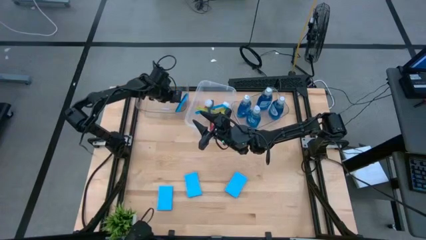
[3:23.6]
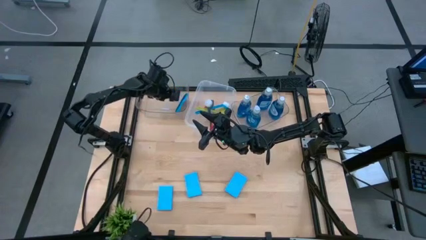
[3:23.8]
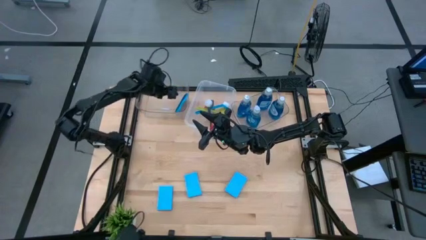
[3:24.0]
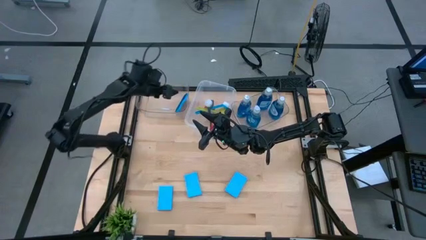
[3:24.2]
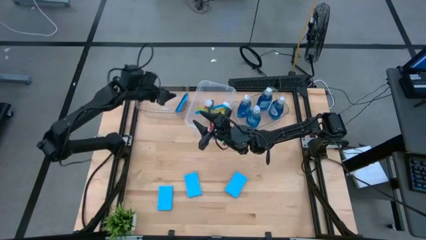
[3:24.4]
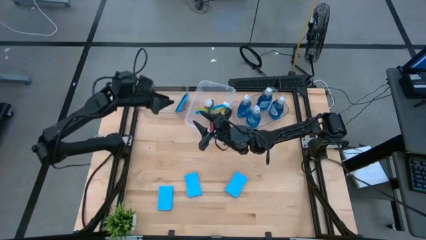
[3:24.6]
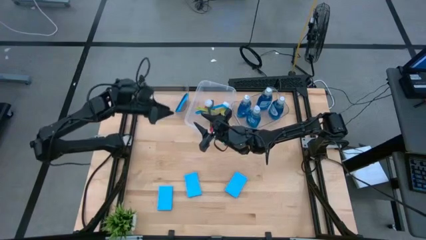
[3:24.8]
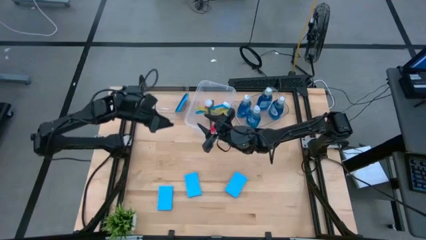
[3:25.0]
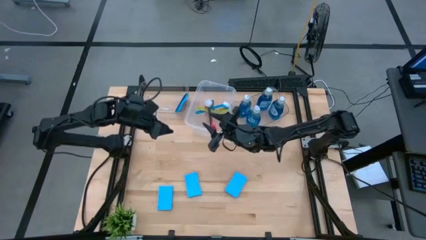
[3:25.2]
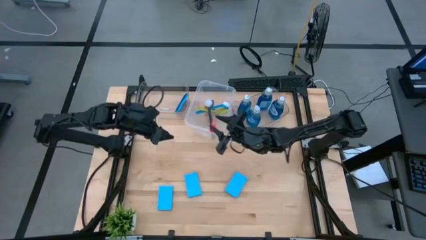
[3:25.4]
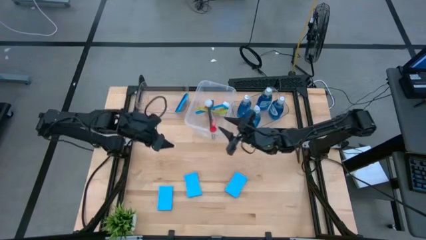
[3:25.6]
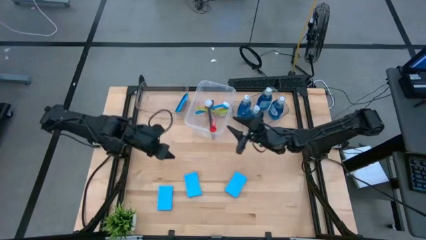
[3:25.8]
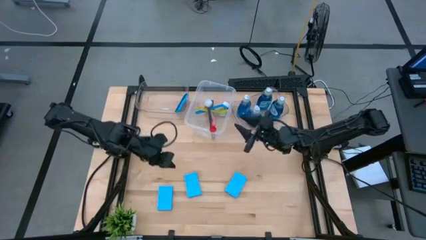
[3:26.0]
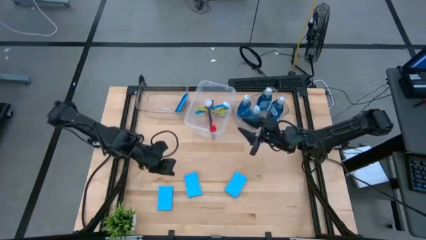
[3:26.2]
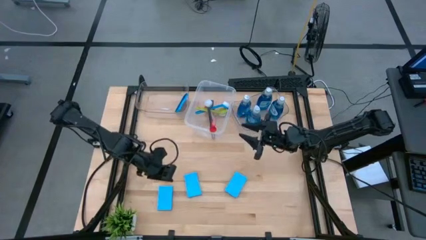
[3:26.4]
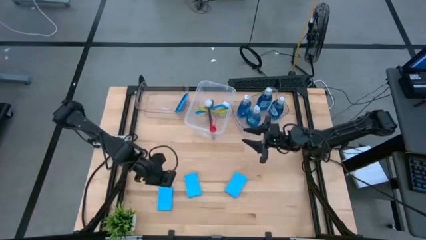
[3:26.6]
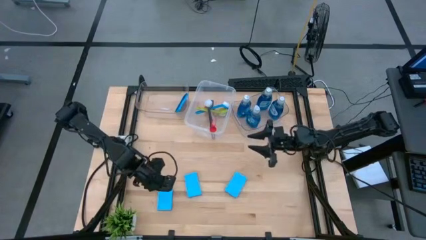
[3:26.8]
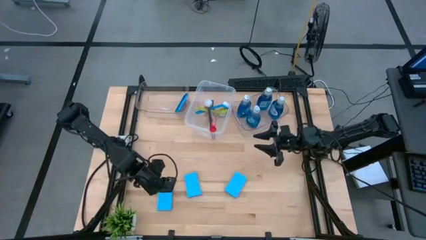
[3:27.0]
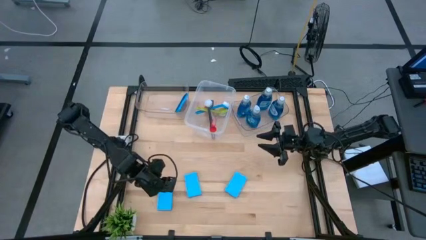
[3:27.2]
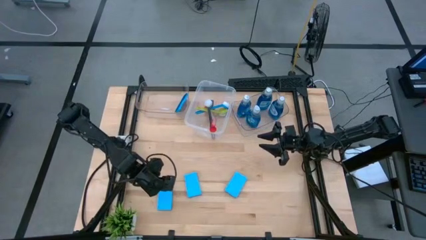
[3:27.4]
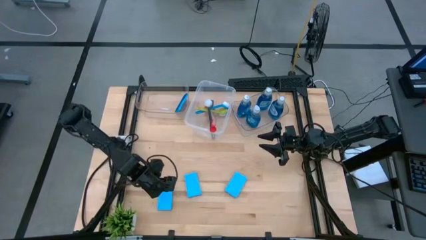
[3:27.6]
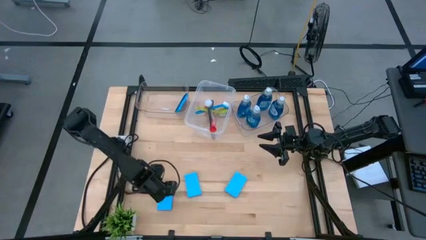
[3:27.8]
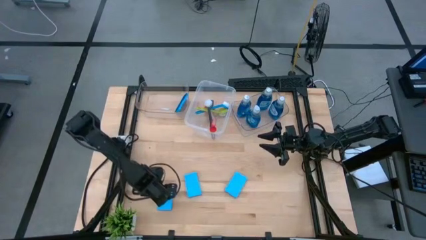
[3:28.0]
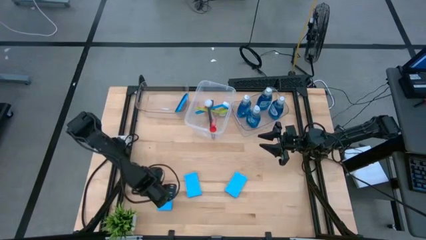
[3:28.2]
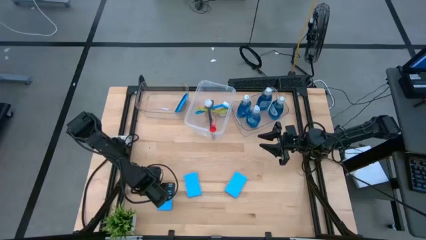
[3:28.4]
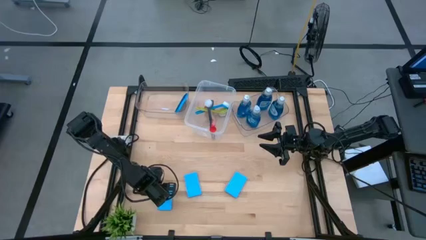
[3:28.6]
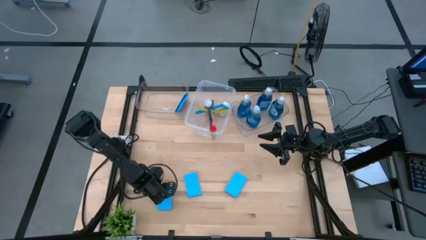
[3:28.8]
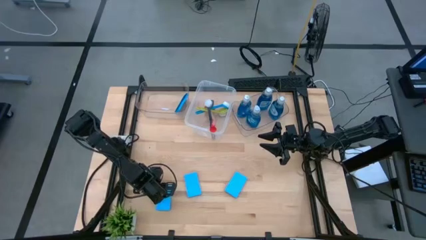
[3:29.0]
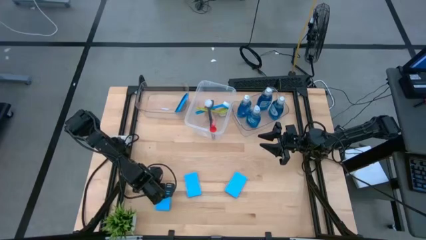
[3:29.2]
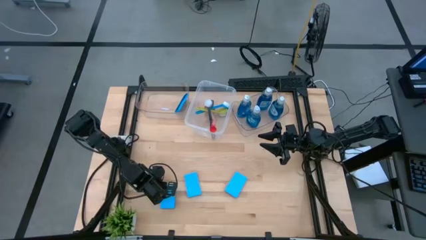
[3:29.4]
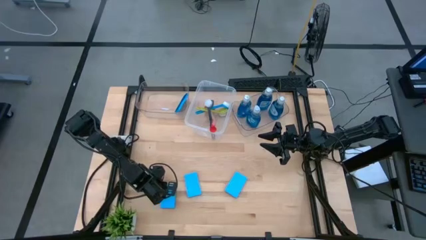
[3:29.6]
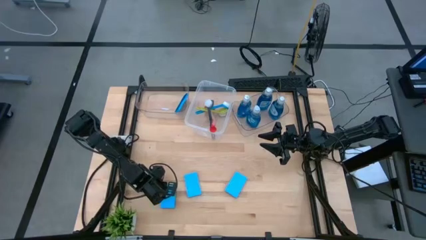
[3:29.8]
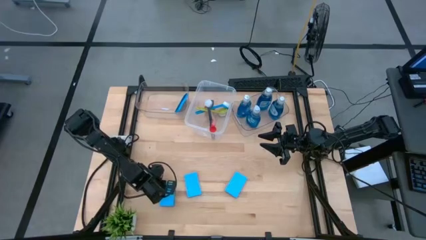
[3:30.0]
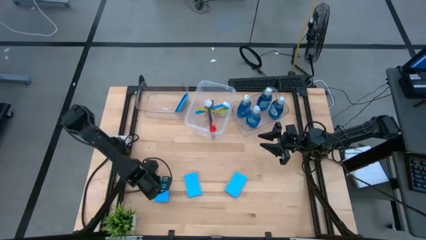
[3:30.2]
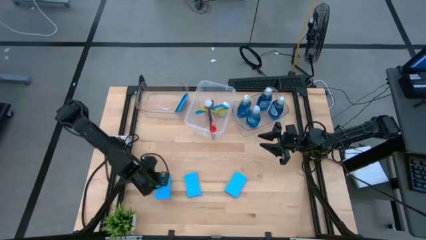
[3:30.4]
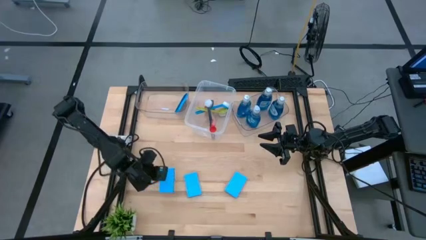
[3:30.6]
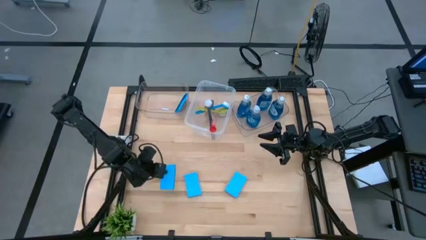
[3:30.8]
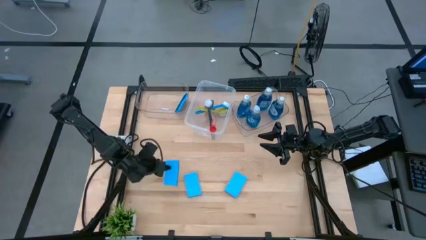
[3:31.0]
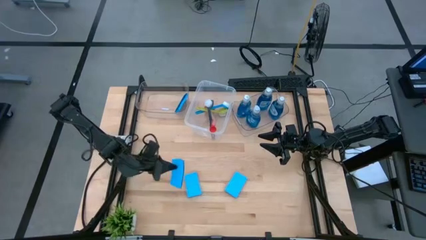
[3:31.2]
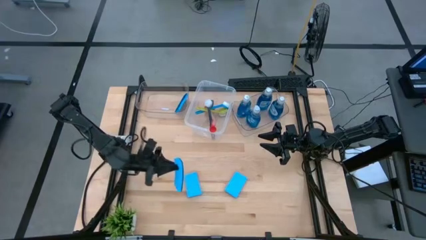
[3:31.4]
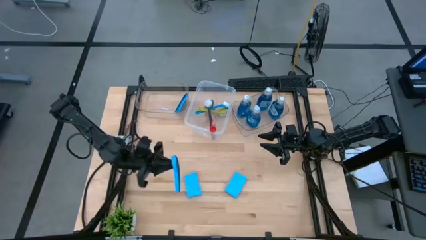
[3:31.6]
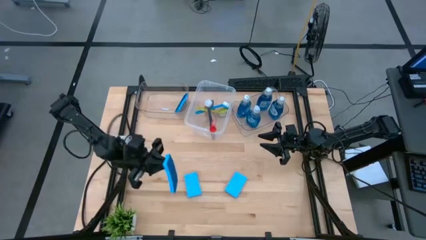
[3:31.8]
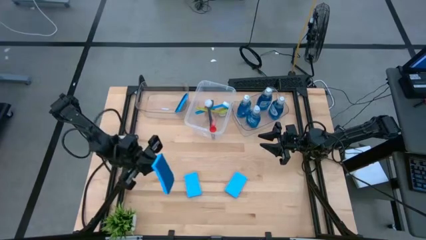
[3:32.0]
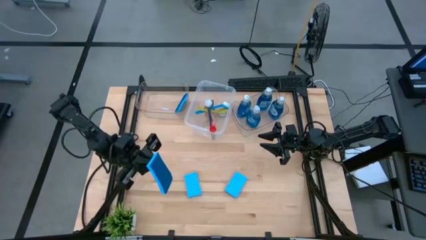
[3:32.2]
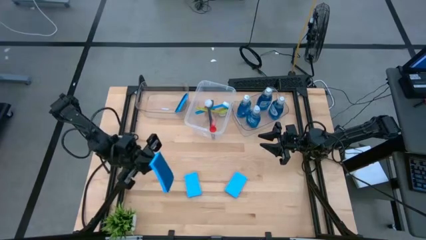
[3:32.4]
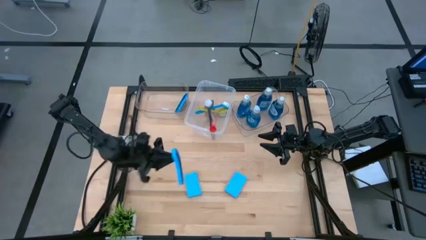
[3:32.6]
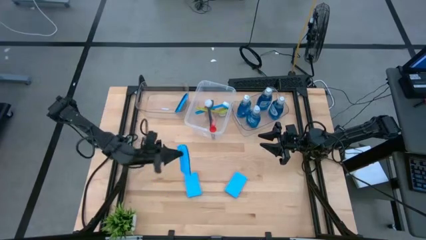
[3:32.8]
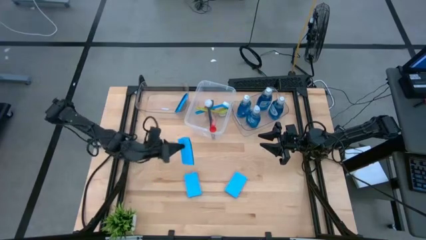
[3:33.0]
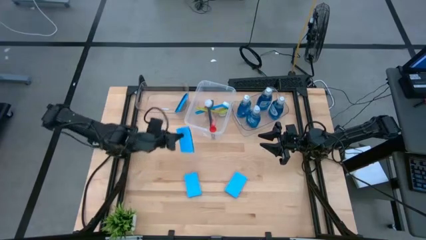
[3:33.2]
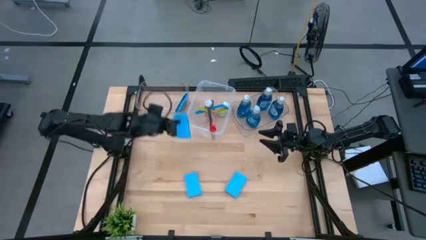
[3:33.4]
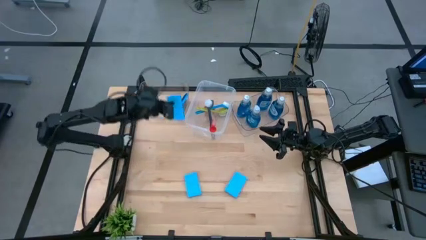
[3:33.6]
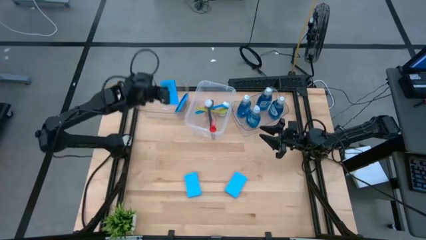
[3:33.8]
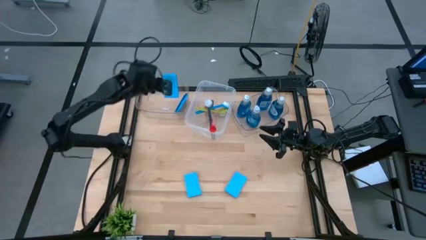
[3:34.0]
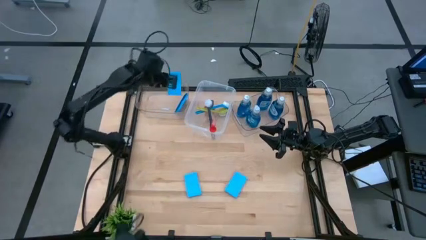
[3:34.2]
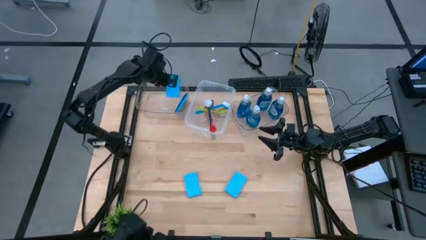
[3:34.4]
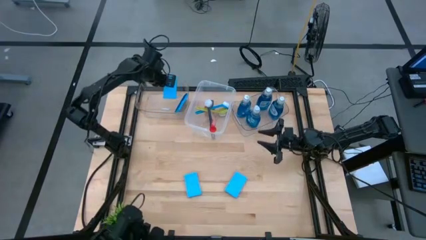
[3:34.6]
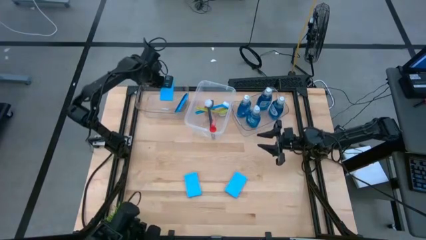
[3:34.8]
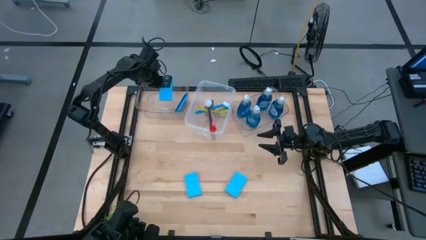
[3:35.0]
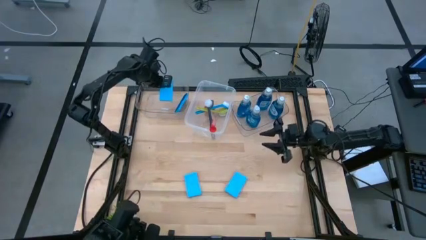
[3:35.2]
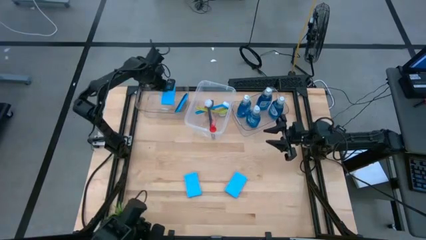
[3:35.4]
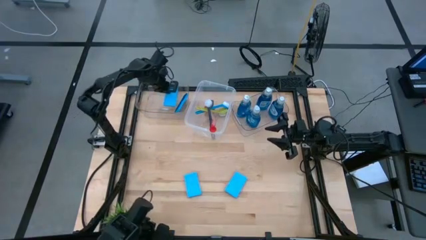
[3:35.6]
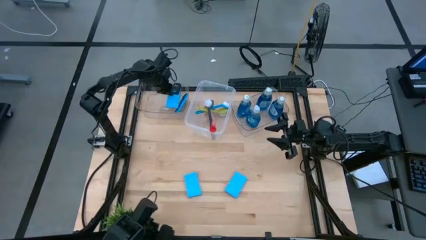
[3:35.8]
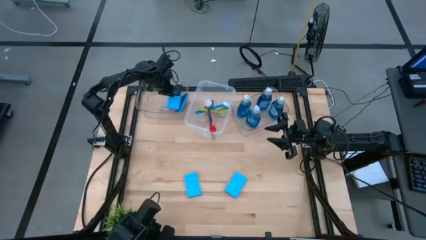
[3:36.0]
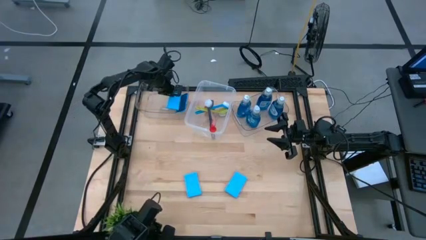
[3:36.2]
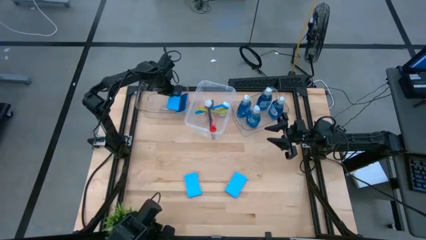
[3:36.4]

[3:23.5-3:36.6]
Task: Pick & Place Kitchen Sink Supplies
Put the blue sponge into the left transparent bin

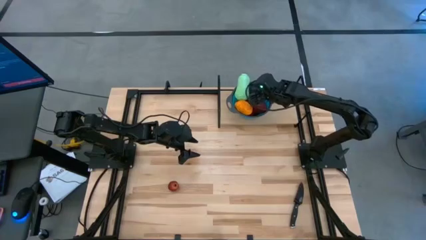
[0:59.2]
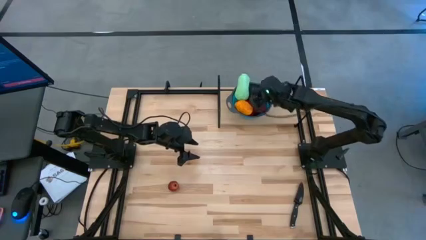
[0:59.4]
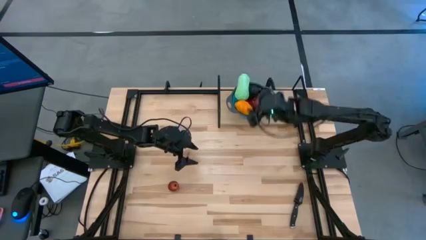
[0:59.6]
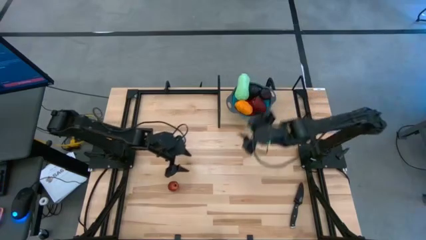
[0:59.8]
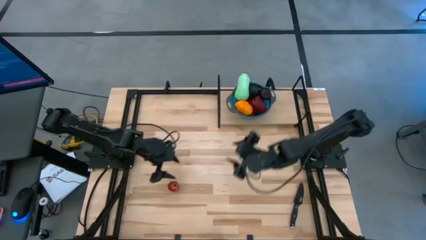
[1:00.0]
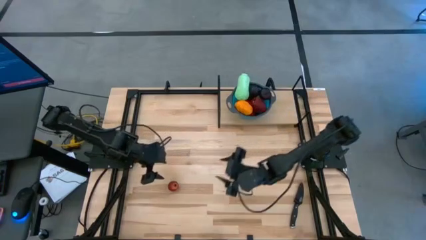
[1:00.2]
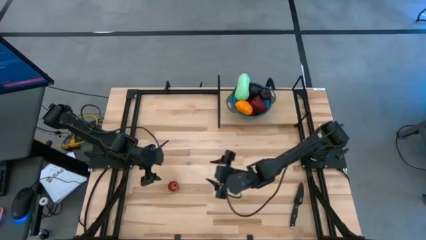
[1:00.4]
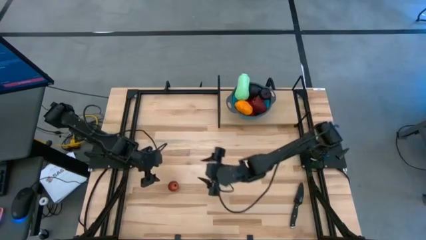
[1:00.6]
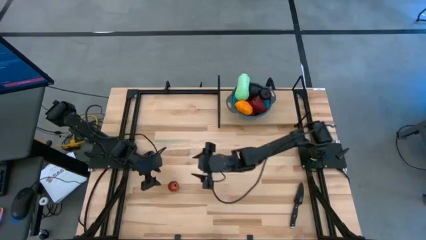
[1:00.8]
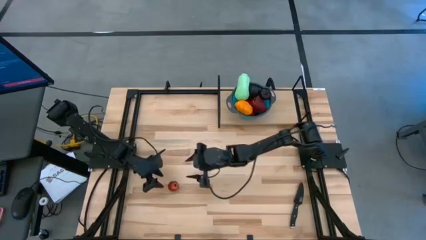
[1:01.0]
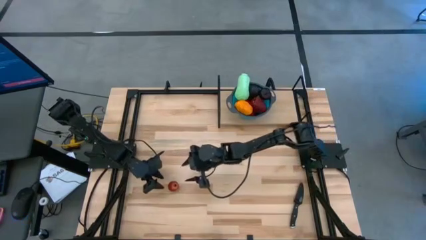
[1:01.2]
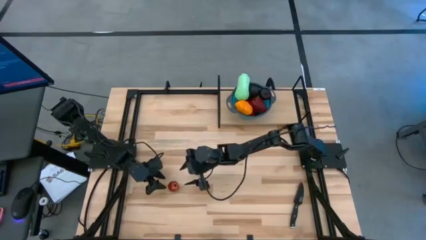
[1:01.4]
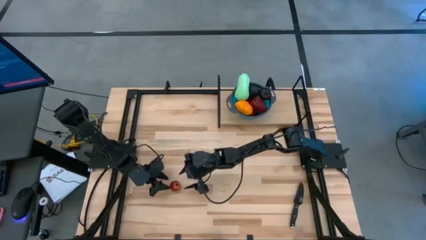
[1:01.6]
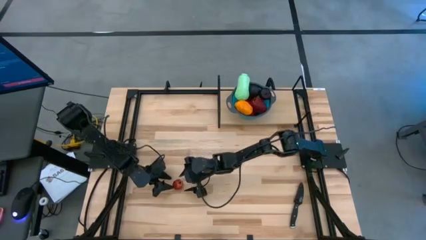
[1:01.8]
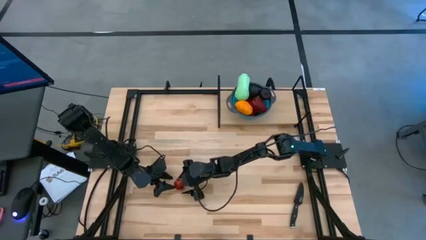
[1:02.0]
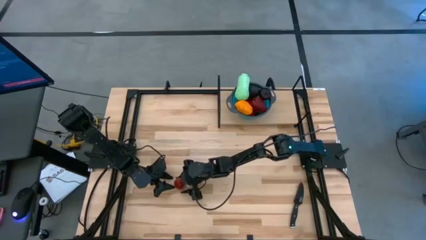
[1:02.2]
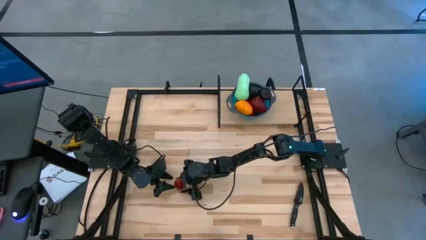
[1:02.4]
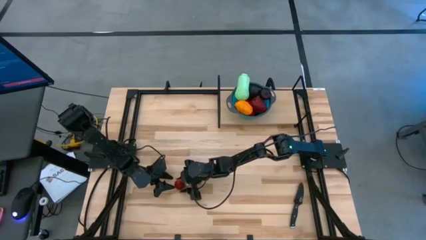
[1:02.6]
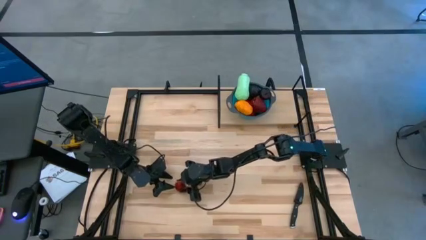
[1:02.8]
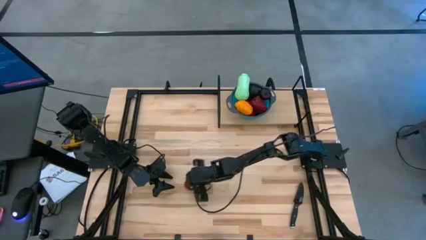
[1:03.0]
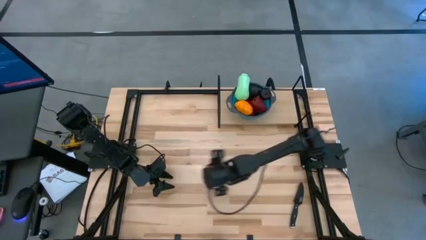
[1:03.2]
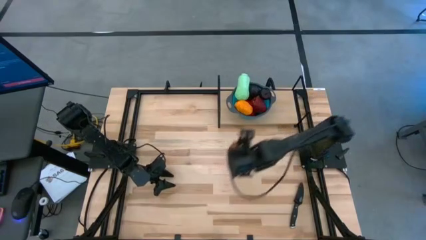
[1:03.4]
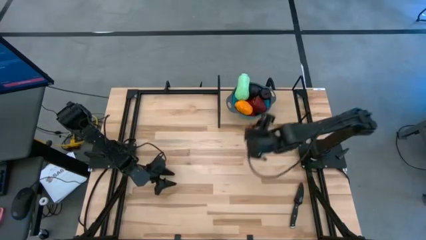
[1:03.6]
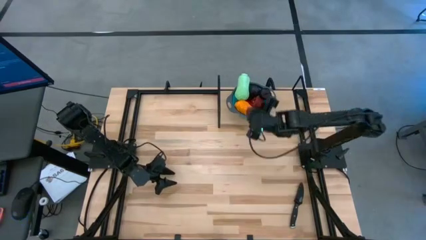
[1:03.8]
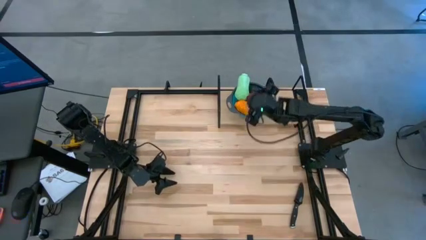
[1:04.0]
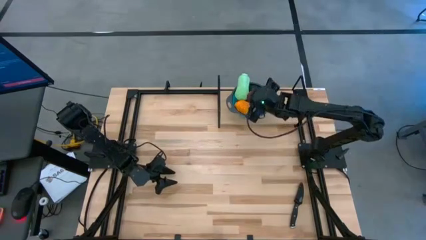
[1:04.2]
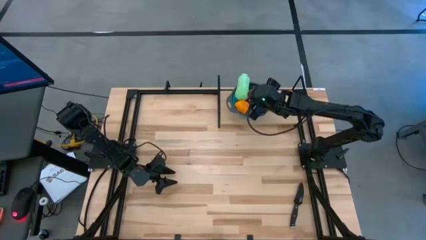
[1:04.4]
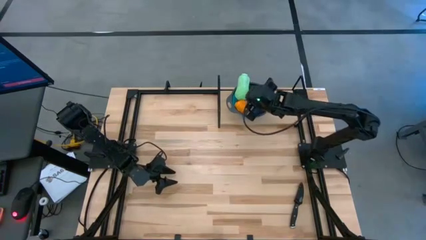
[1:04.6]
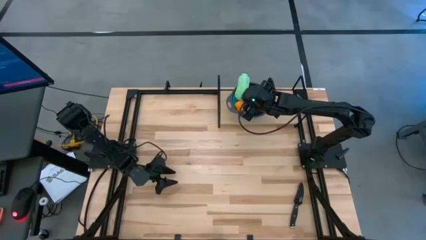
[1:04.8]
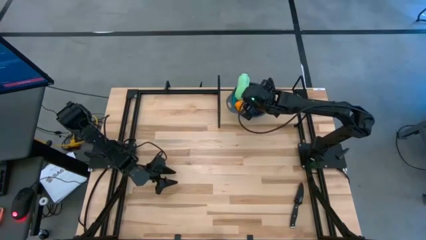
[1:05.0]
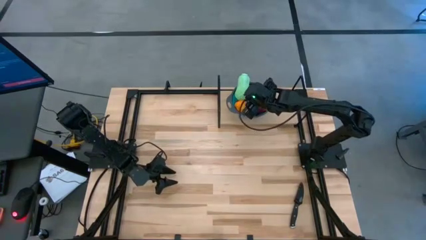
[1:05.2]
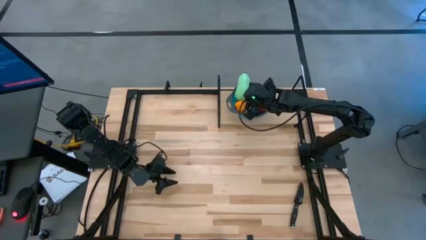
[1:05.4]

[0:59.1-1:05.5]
Task: Pick & Place Fruit
Put the red pomegranate into the blue strainer bowl on the shelf
